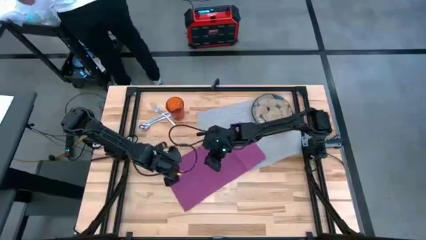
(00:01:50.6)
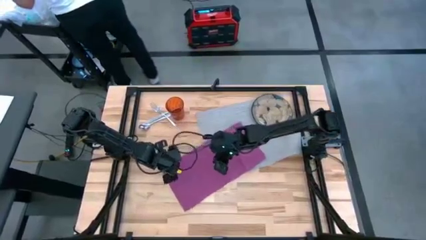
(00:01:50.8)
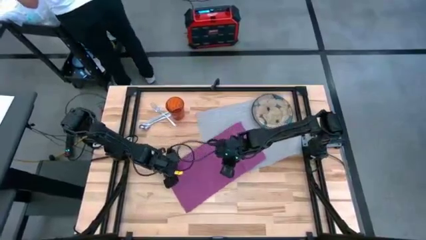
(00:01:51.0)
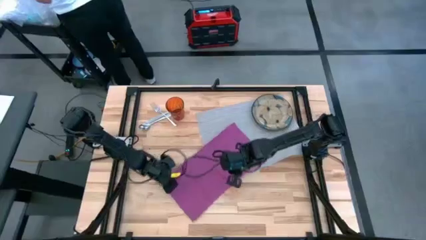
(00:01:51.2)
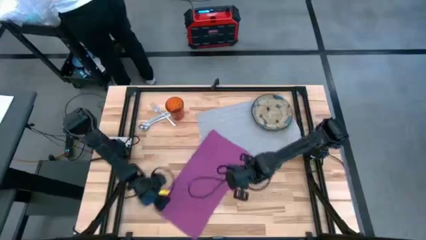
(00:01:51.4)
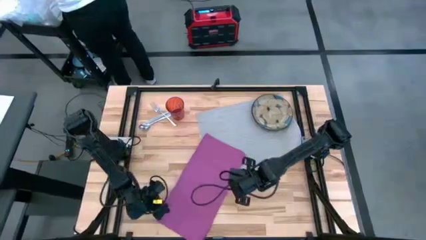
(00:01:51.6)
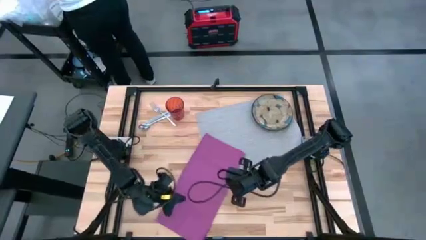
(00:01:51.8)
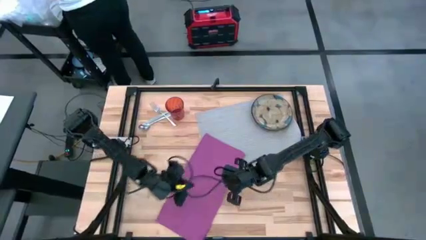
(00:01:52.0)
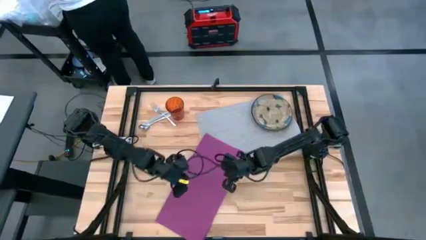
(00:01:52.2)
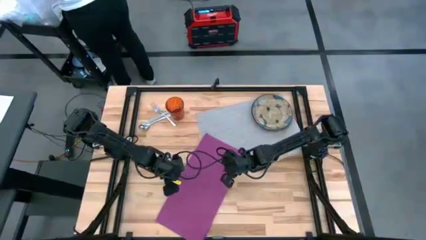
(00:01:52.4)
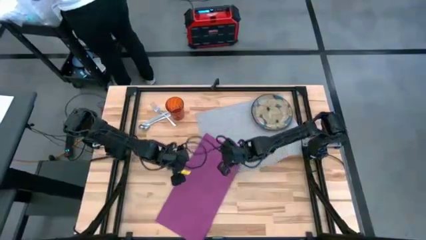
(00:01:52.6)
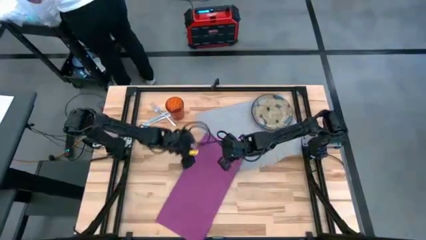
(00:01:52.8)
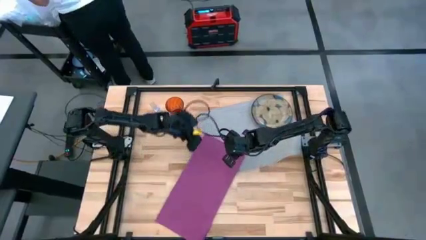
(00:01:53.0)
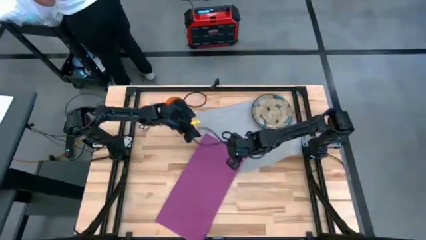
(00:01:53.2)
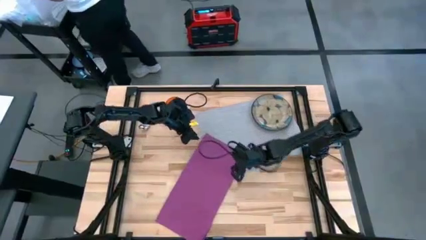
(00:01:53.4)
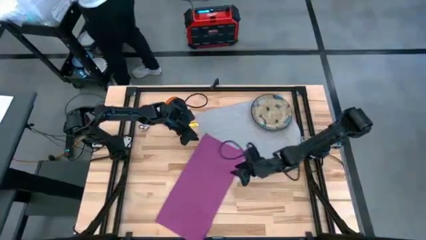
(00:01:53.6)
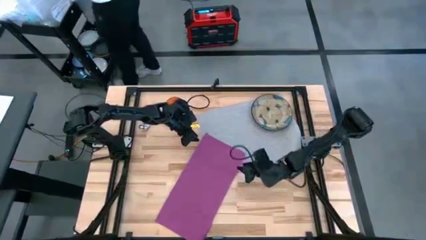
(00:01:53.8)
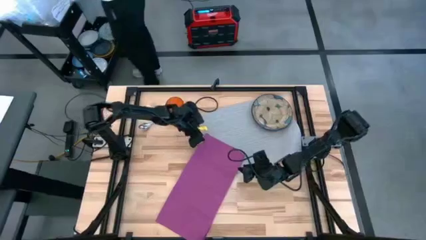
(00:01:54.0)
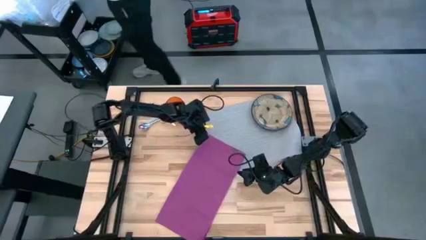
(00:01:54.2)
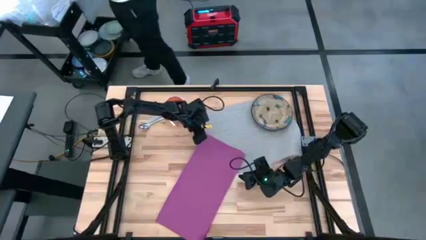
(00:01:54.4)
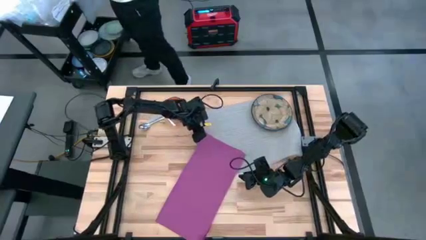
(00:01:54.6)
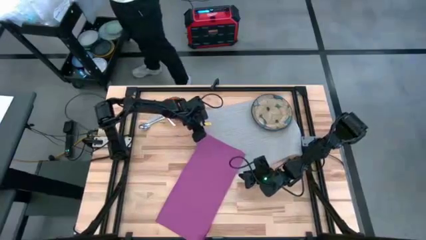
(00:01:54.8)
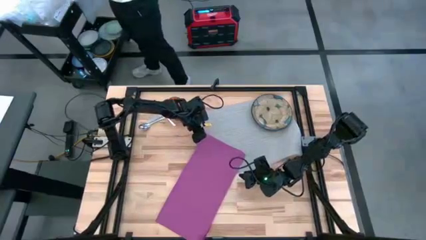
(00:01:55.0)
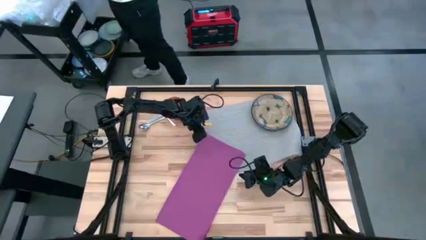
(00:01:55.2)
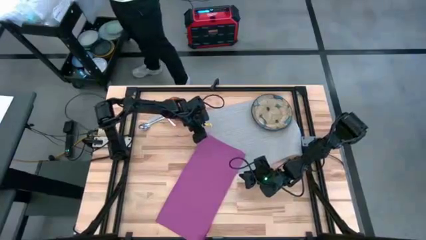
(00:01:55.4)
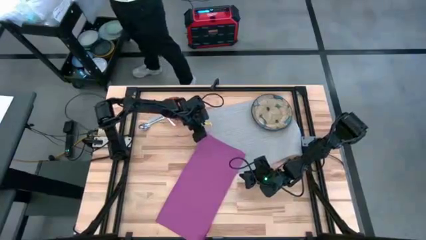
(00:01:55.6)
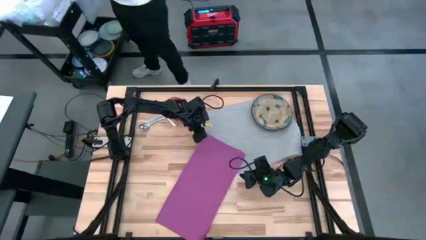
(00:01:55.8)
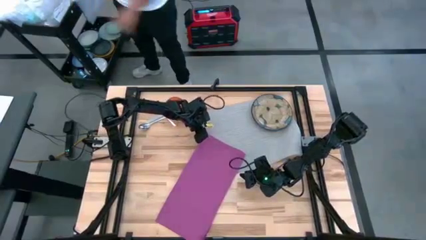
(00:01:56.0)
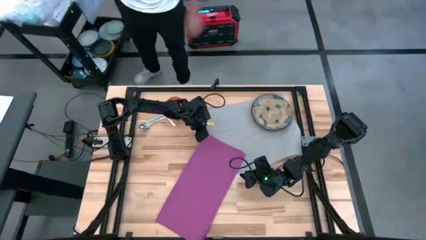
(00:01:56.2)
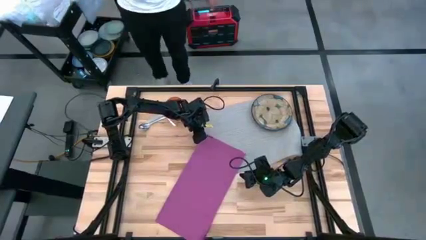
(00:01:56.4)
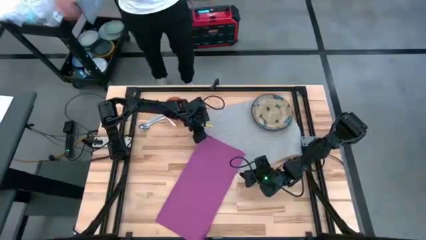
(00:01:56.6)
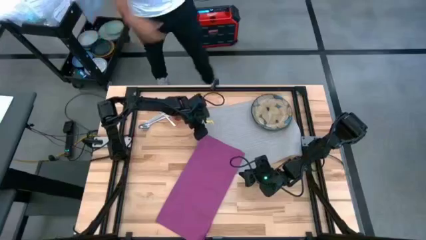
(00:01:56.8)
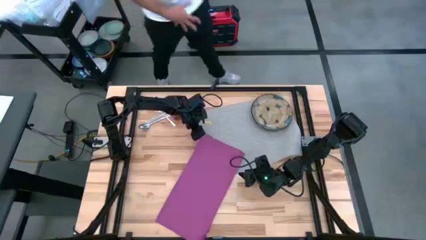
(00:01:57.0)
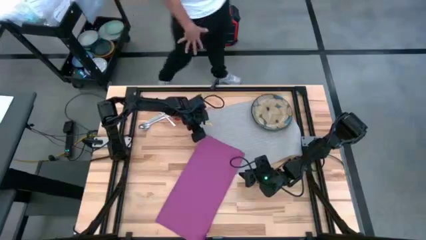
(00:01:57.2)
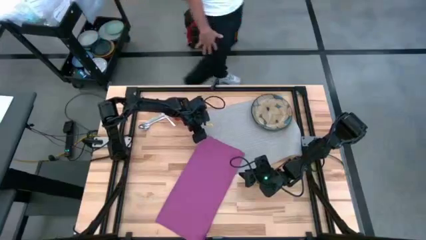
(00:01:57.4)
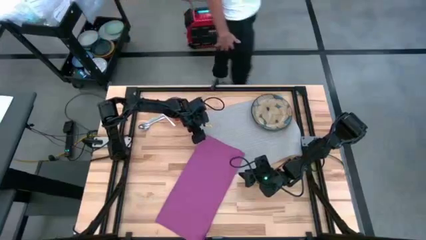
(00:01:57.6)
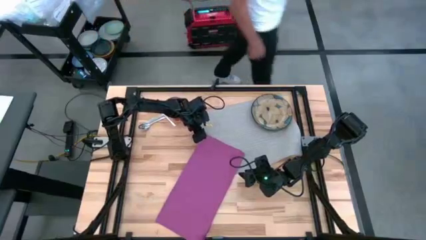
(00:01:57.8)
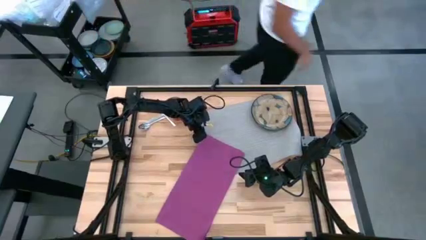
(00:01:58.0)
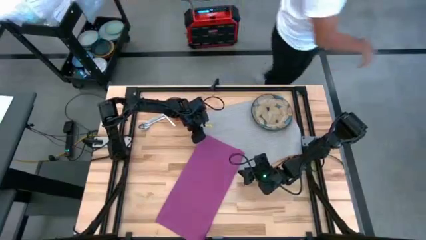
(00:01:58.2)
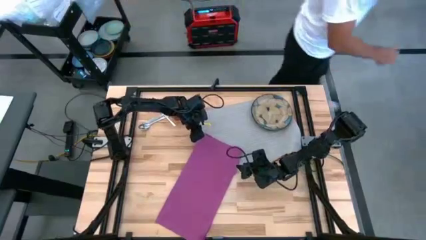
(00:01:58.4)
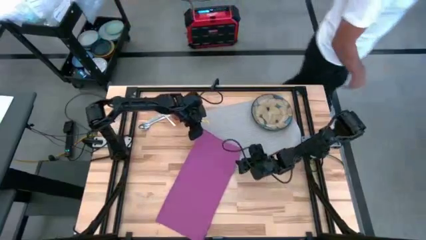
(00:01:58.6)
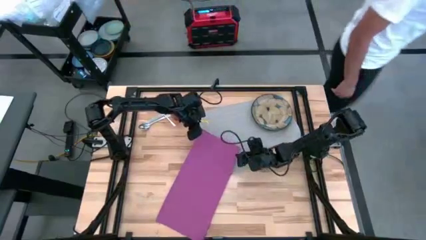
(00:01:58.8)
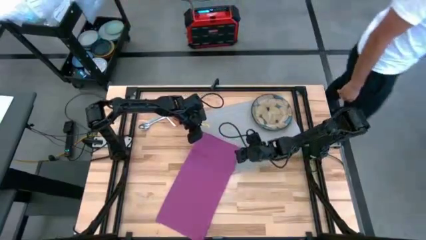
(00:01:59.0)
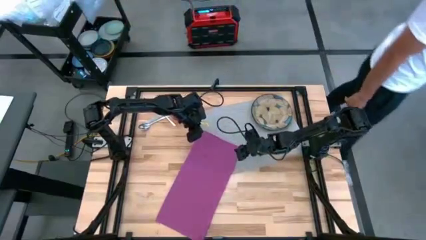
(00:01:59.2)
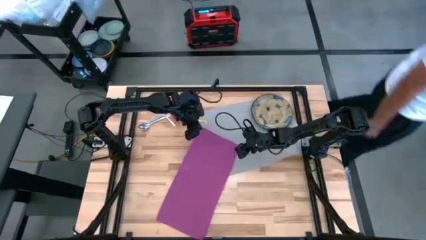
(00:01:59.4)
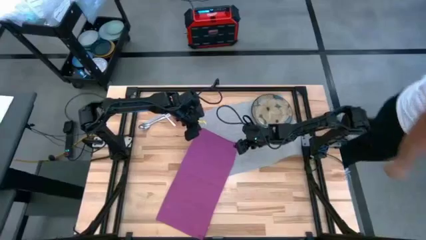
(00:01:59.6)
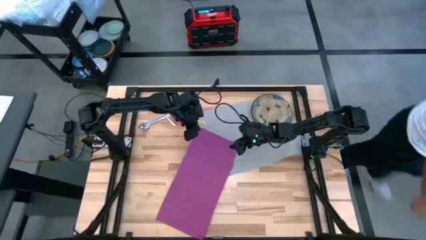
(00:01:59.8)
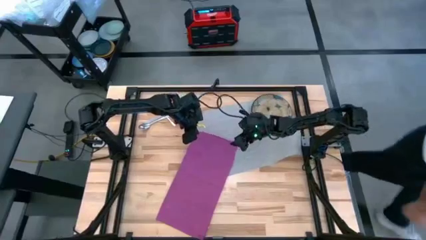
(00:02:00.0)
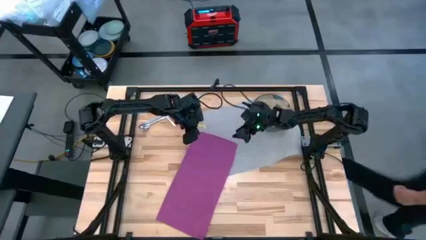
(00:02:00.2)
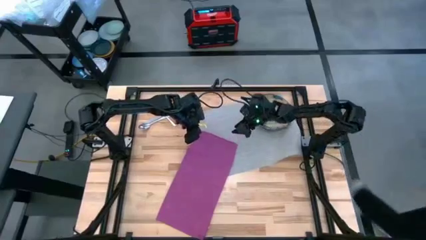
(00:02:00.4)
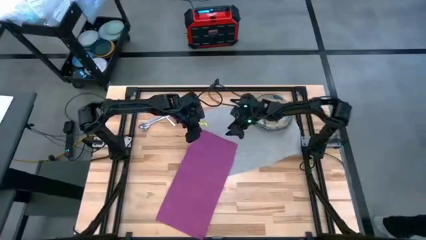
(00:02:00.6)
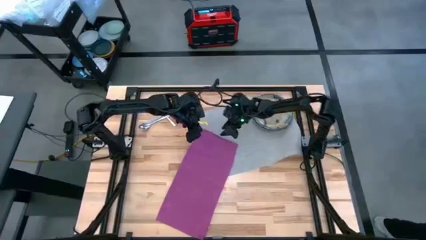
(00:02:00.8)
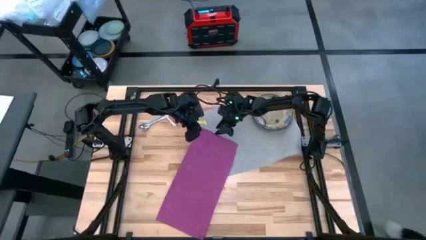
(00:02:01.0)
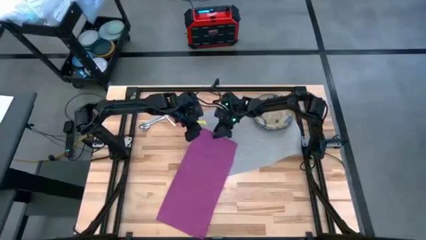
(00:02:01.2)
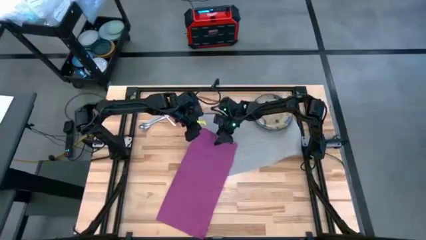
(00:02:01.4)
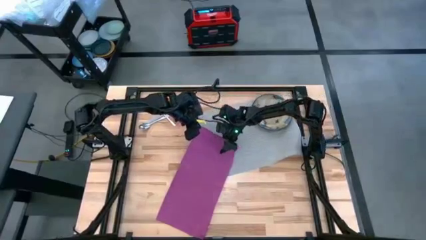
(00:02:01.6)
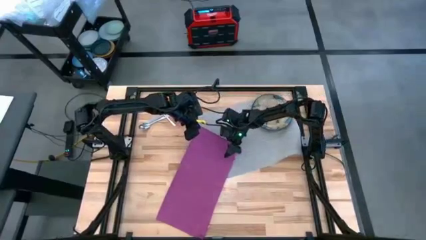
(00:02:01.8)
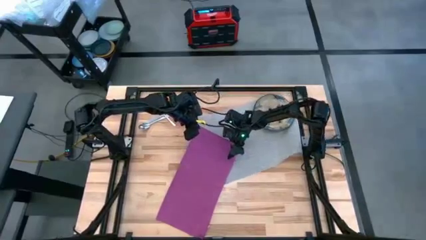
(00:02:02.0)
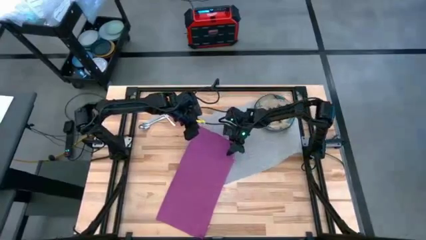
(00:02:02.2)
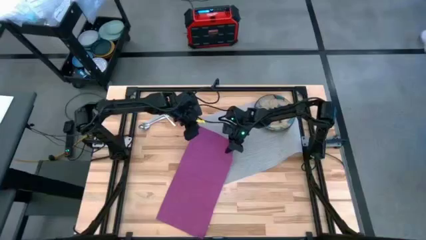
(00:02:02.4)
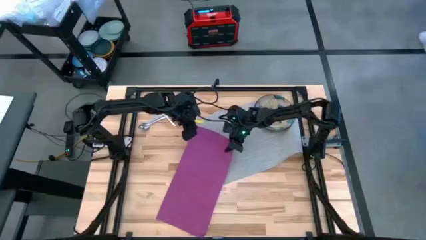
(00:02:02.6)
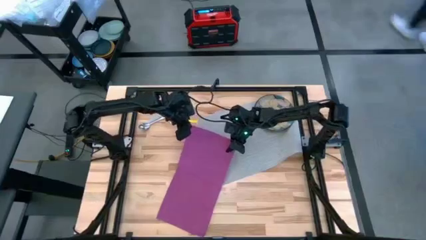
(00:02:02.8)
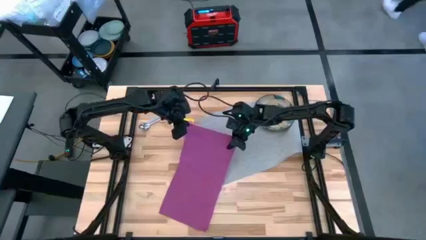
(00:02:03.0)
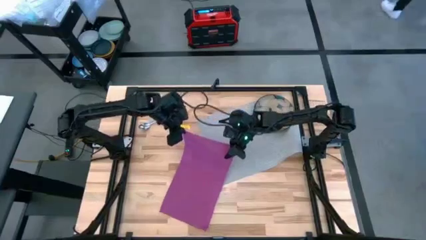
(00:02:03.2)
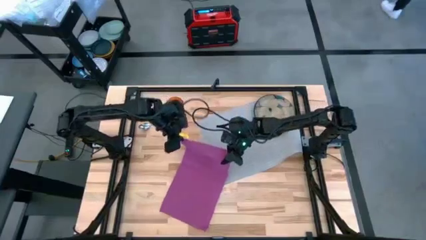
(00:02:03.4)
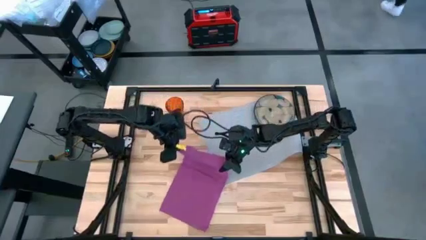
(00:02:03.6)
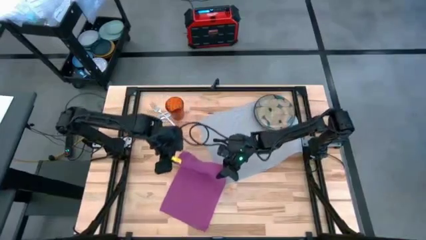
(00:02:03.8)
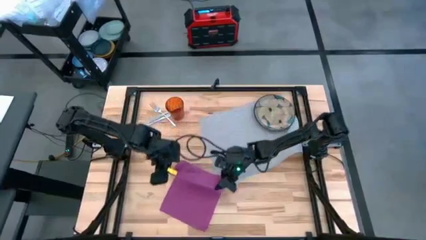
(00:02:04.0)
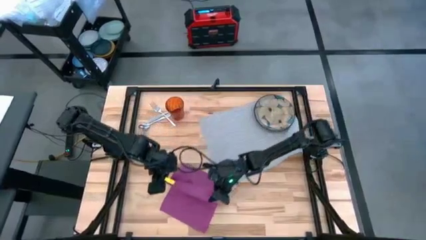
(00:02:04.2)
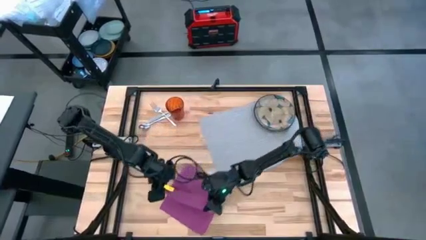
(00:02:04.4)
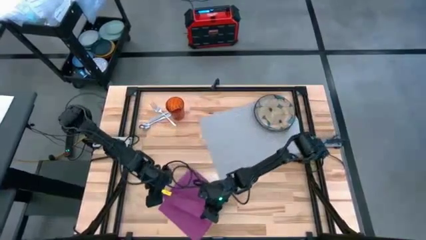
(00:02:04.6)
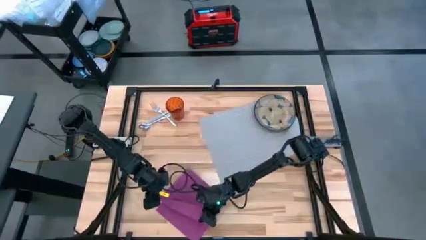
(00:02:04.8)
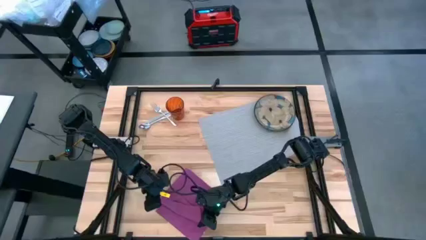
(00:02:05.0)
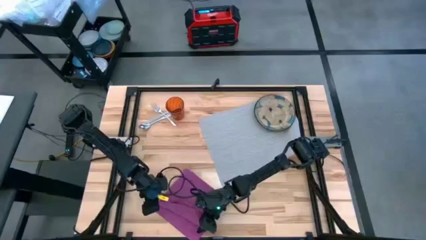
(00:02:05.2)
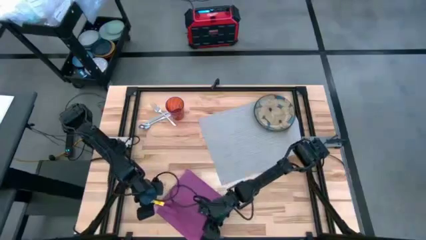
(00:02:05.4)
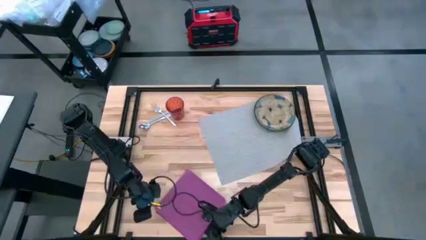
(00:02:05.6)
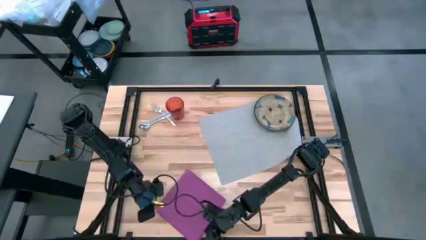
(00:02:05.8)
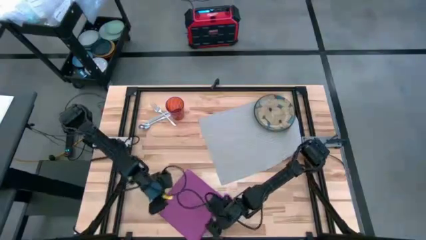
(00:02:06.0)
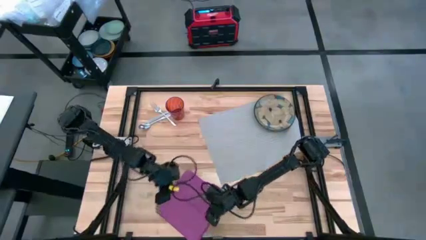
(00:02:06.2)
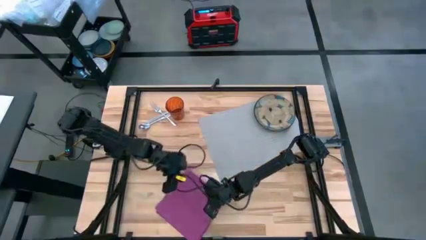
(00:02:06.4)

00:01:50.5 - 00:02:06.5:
Task: Set table place
Fold the purple napkin
